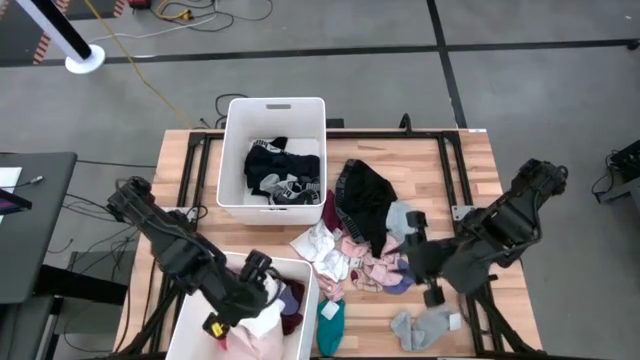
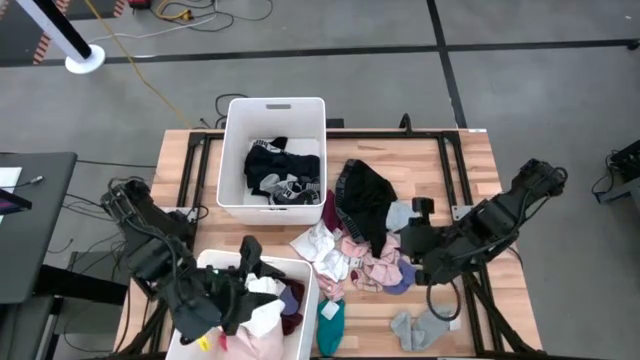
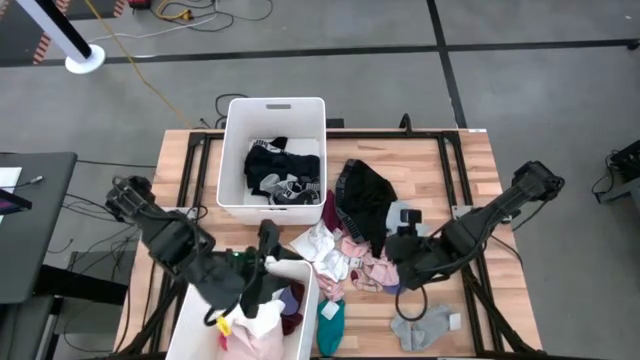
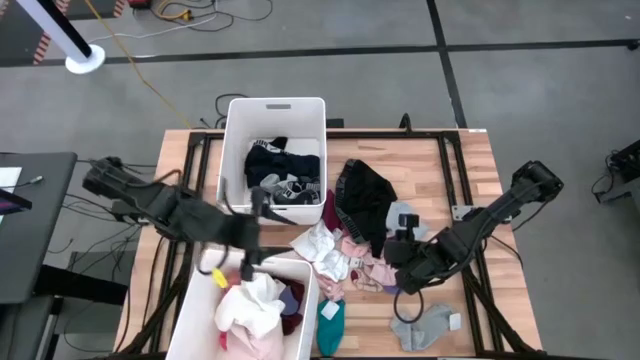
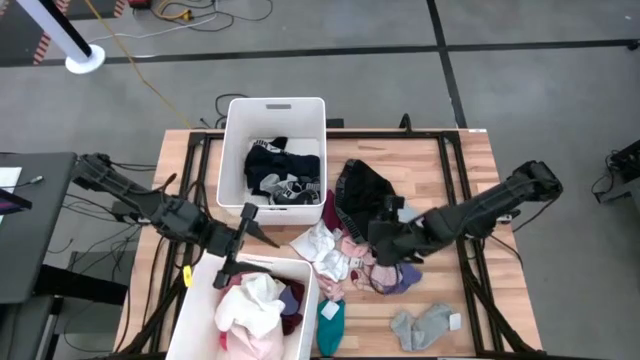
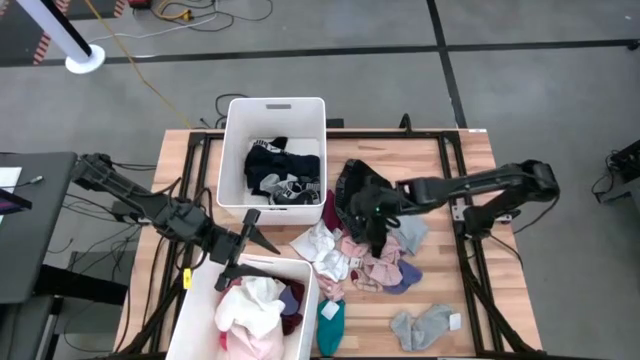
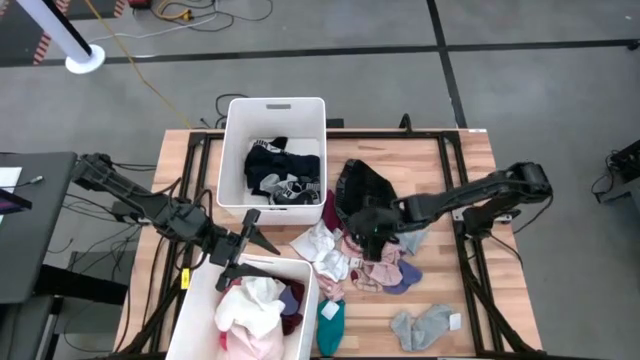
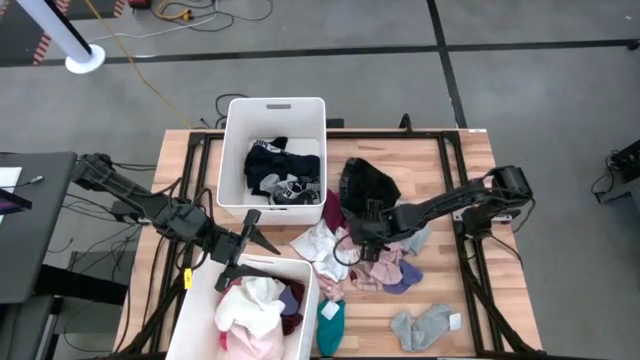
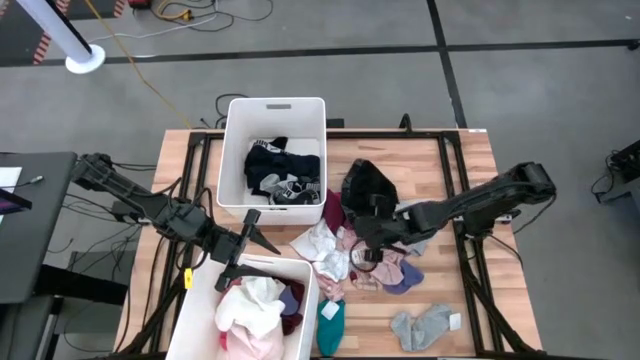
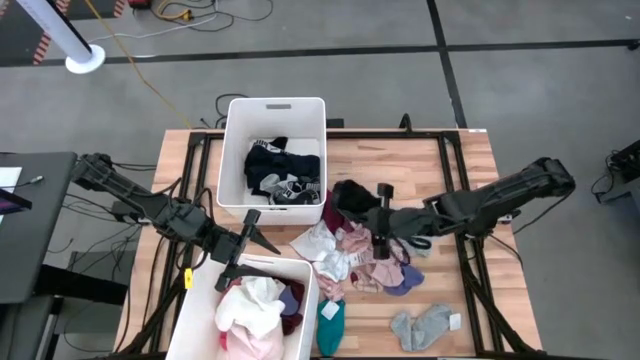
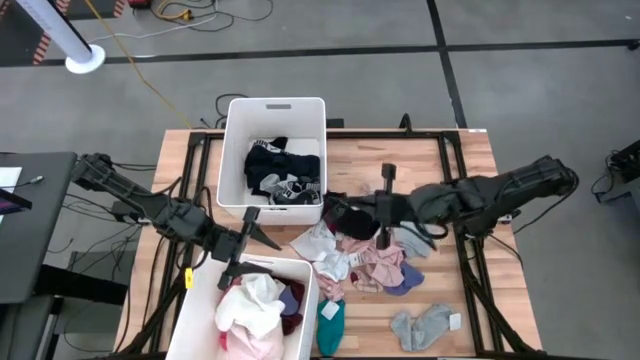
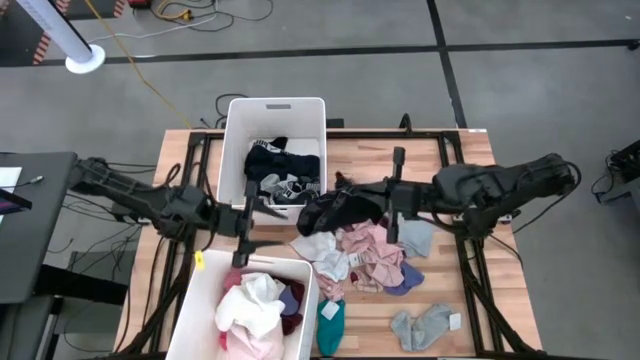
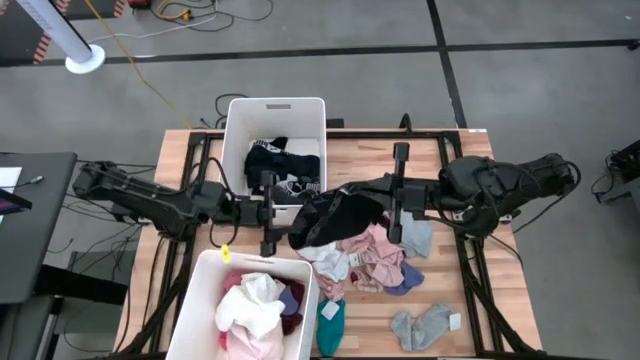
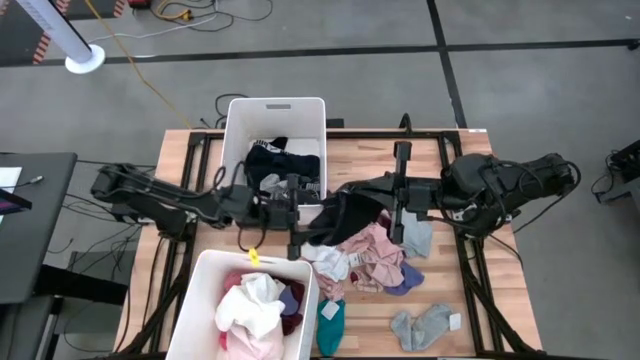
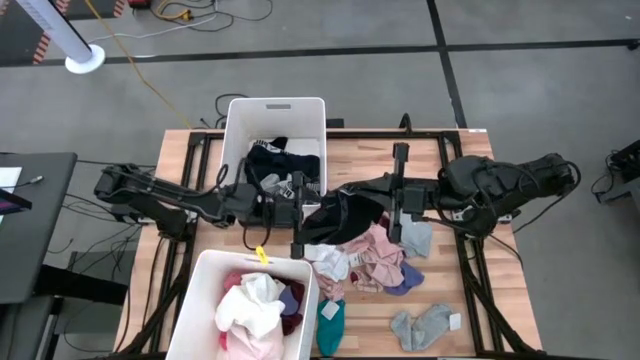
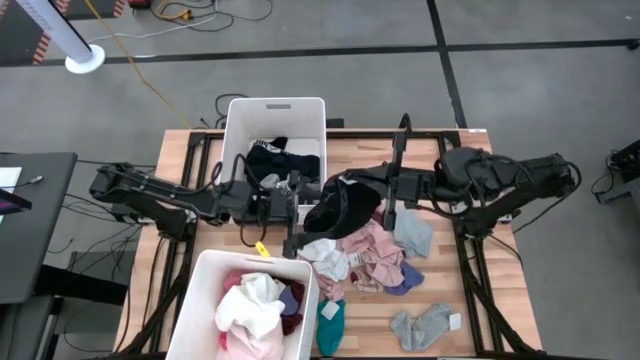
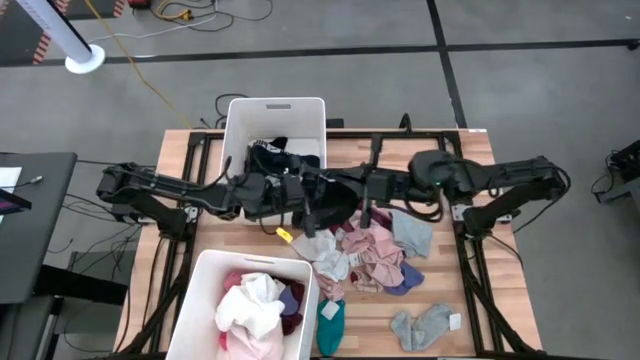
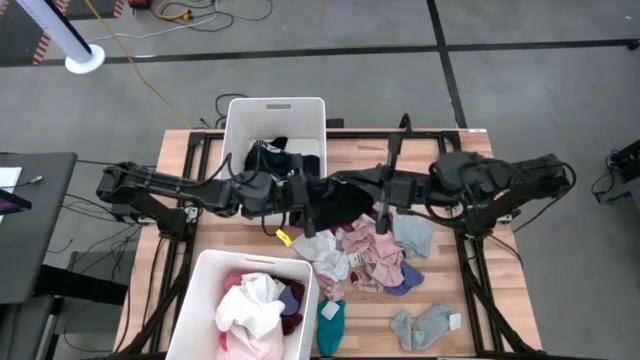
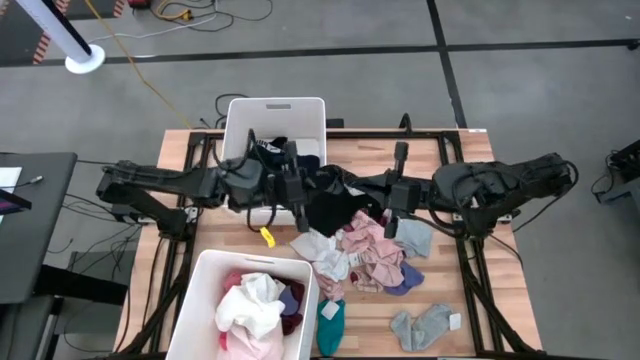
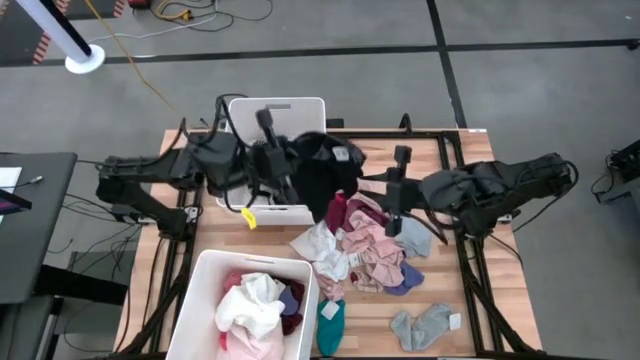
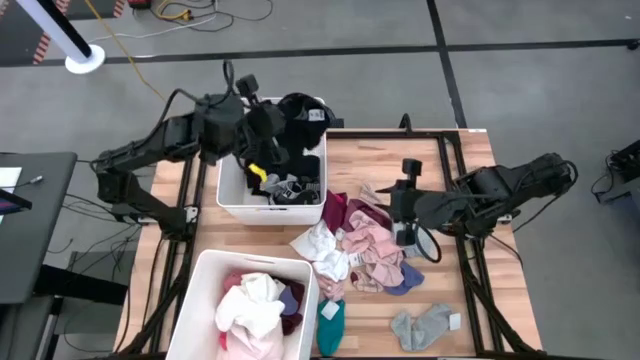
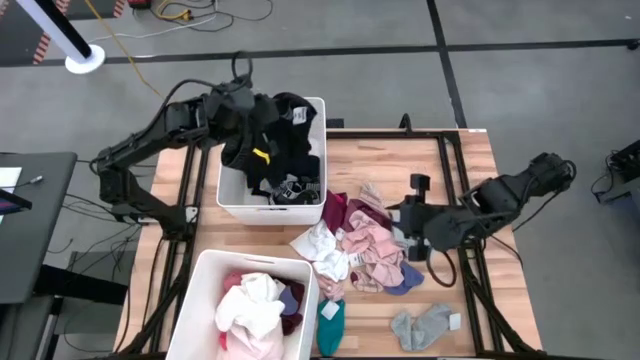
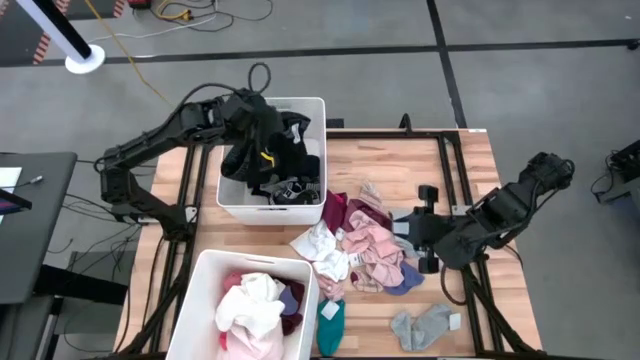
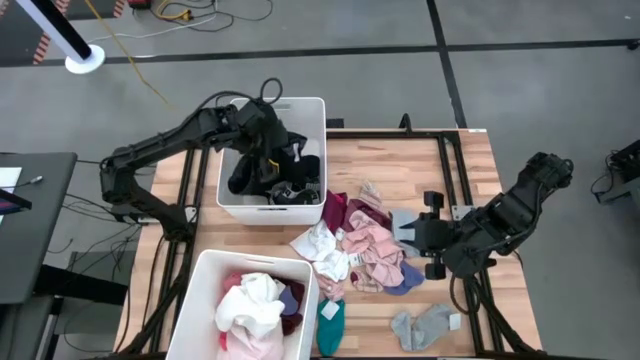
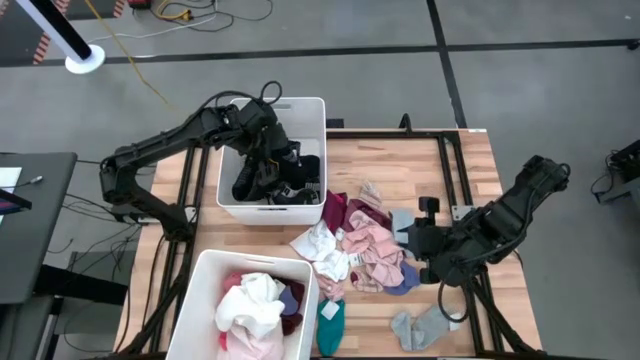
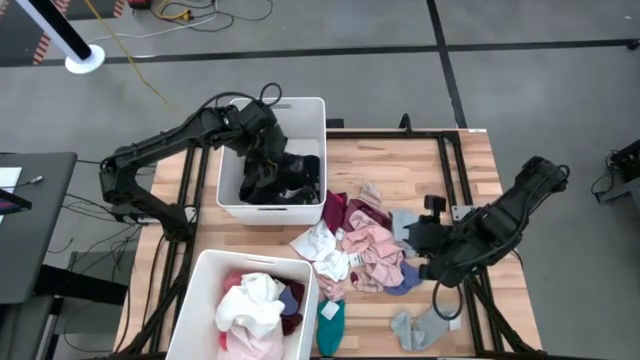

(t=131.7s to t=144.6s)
Task: Sort clothes
Put the black underwear into the top white laundry bin

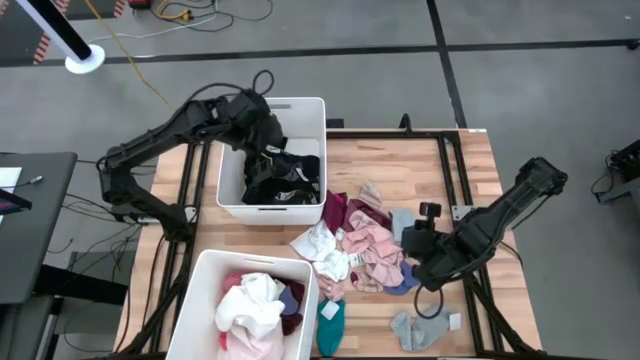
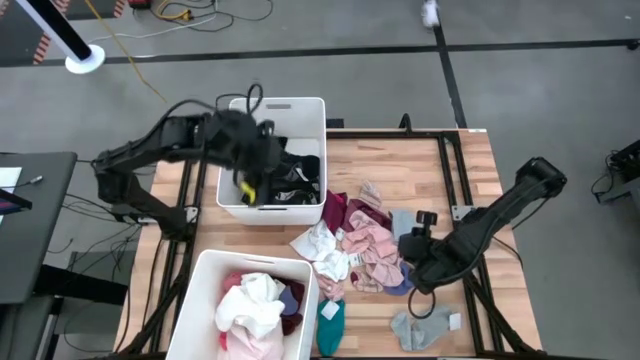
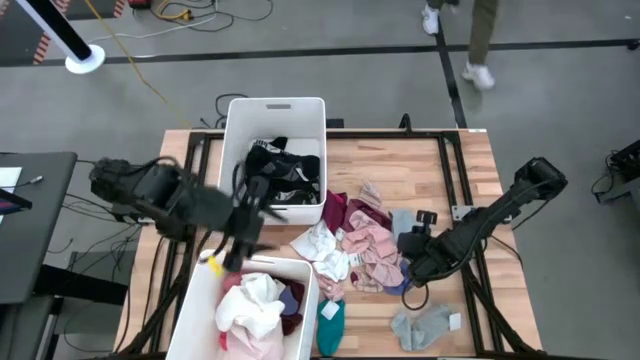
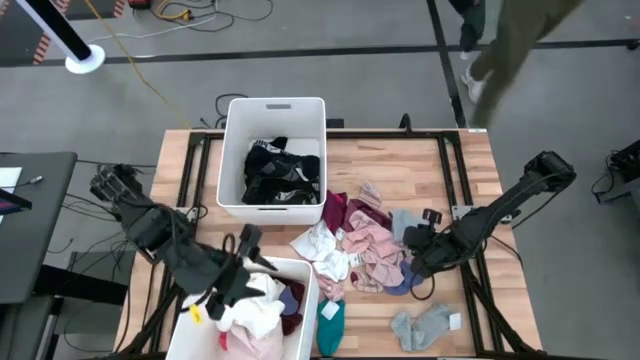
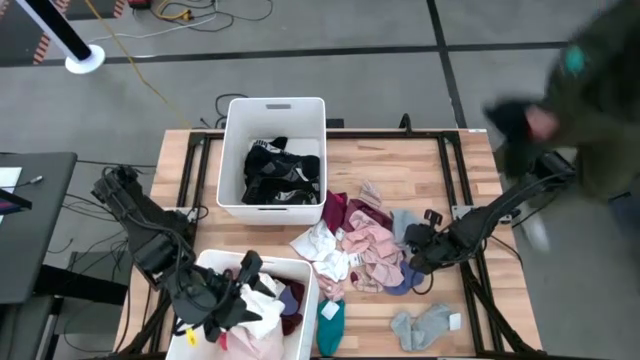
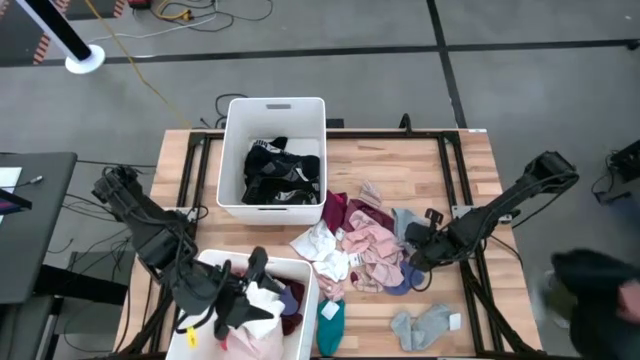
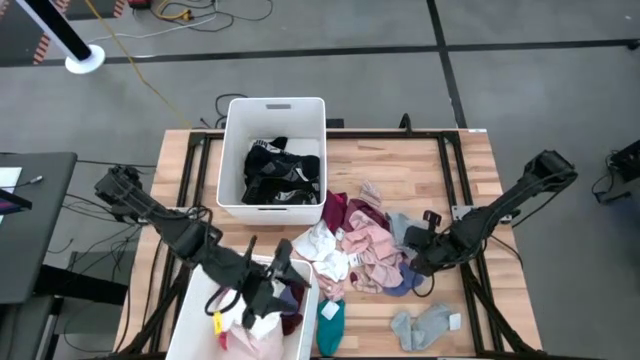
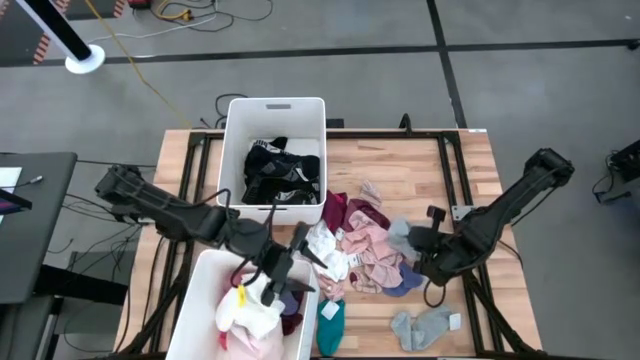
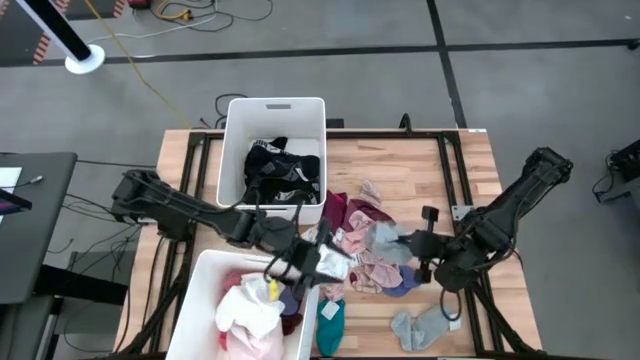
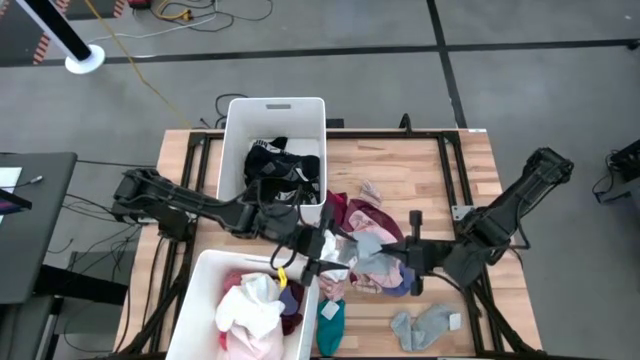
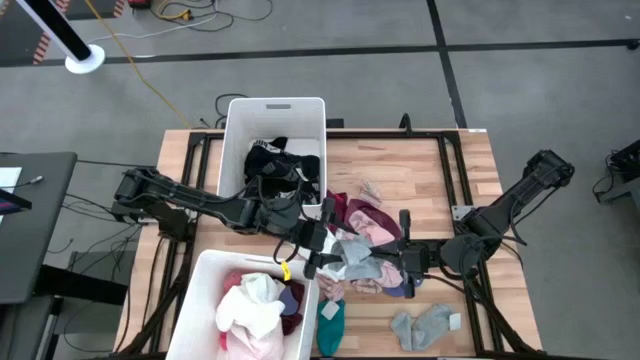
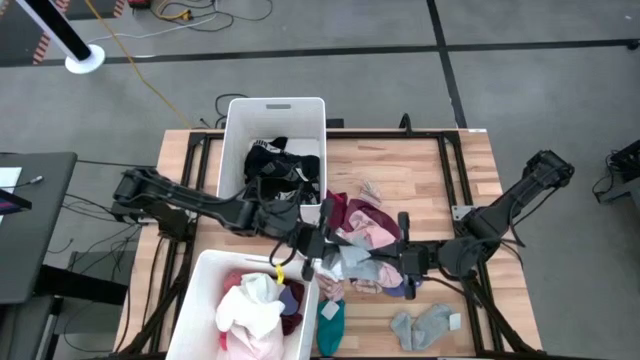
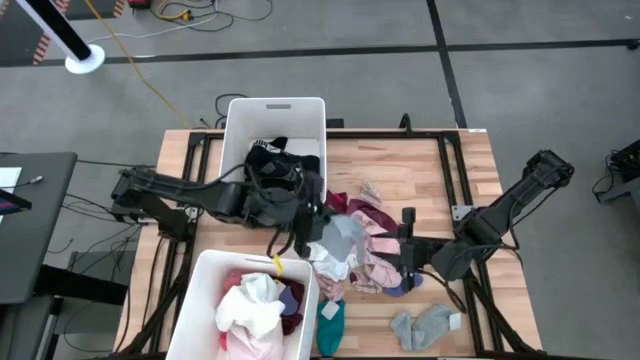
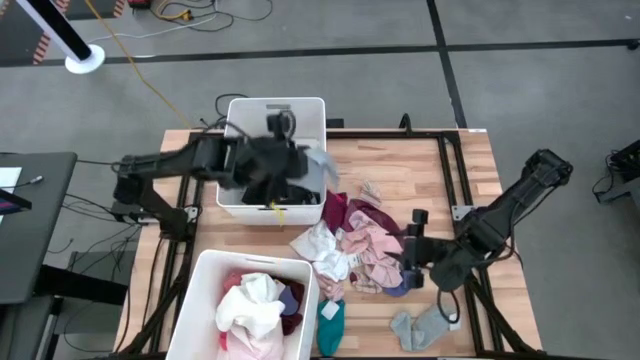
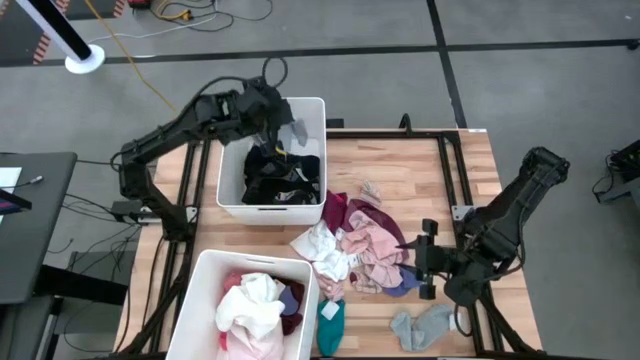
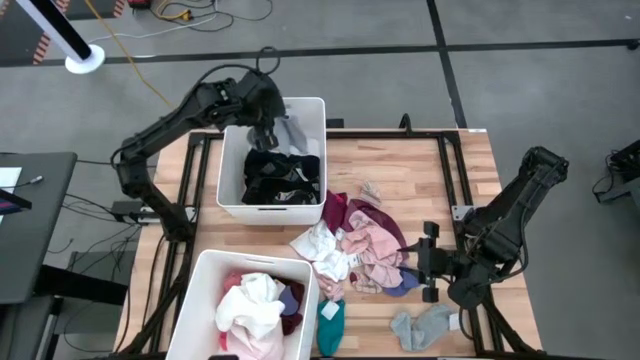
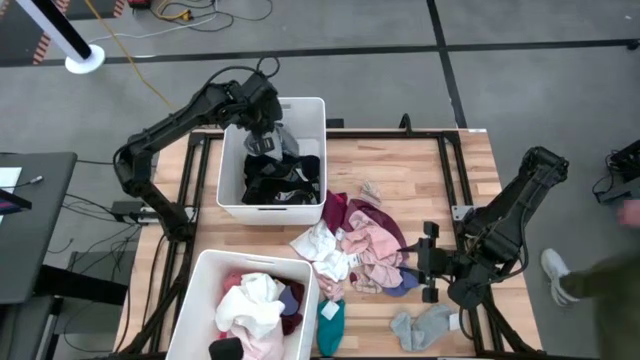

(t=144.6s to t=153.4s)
Put the gray underwear into the top white laundry bin
